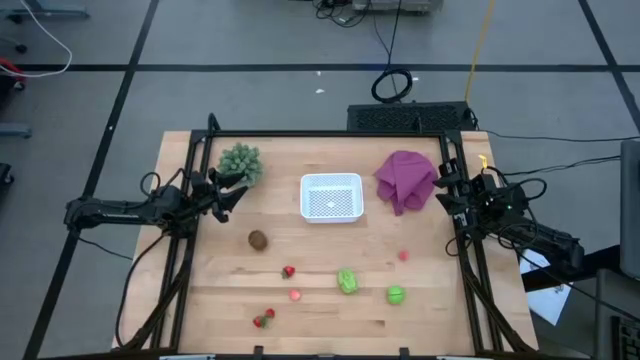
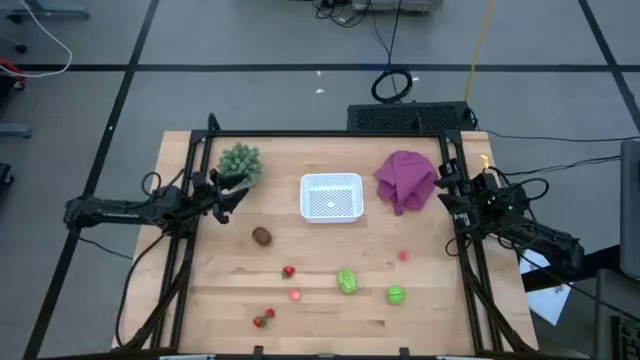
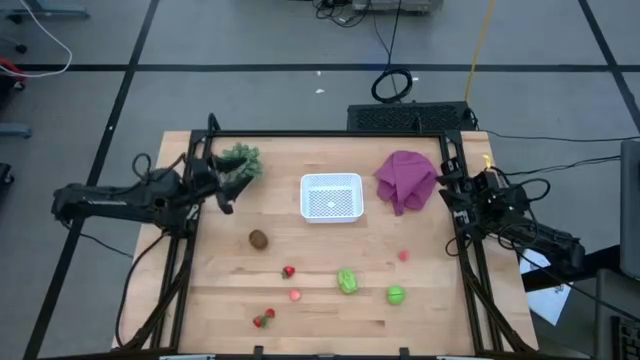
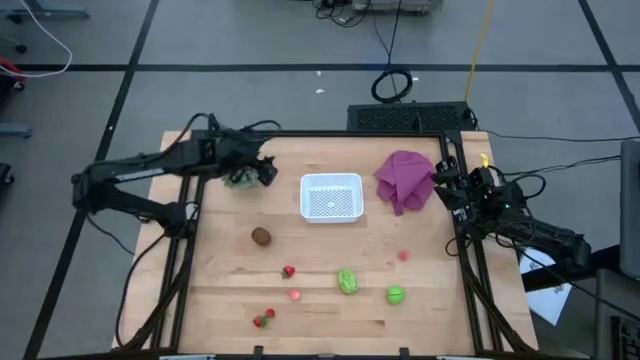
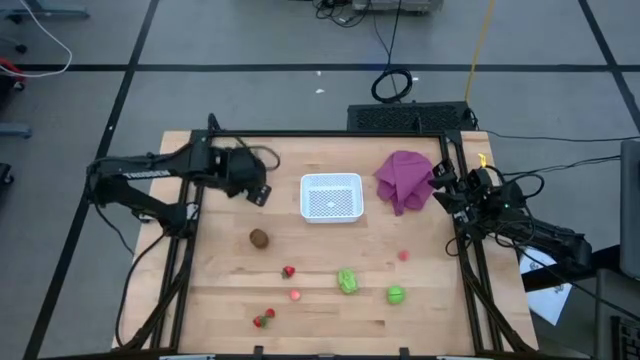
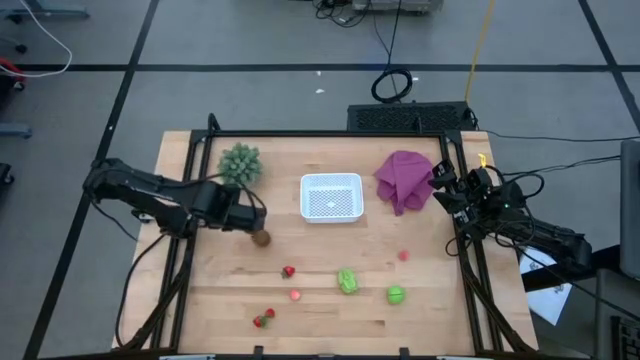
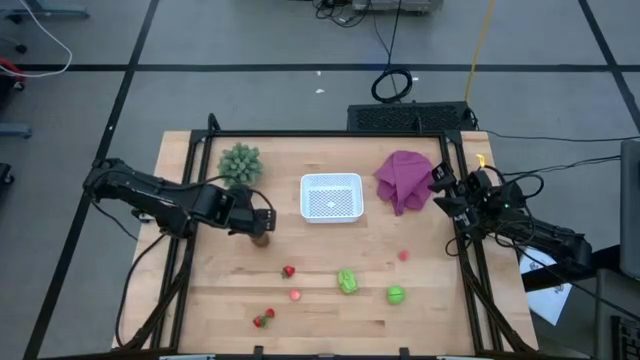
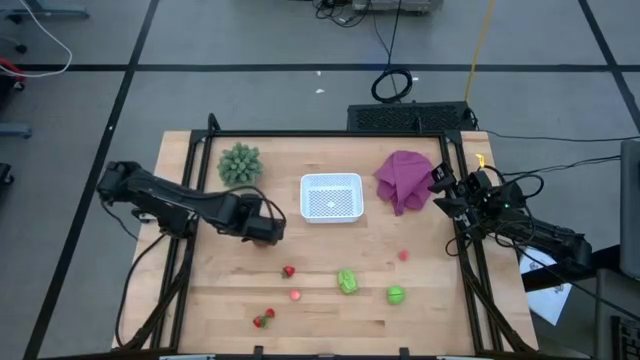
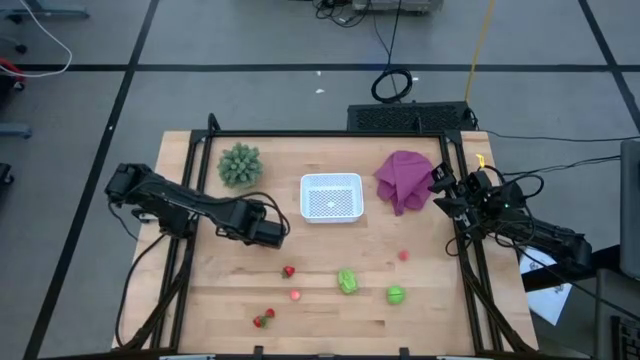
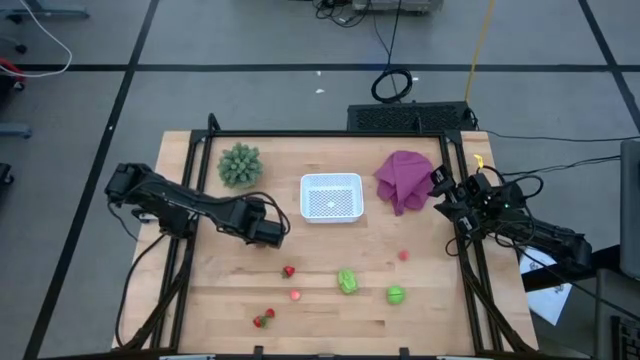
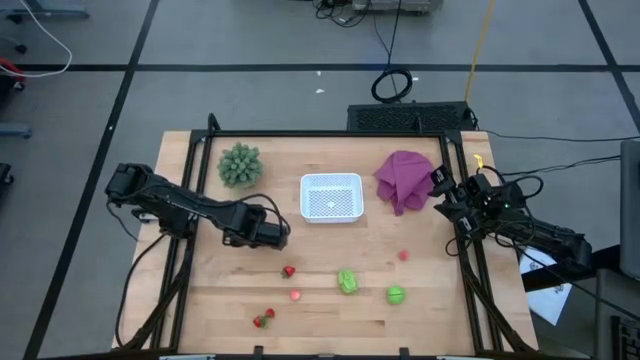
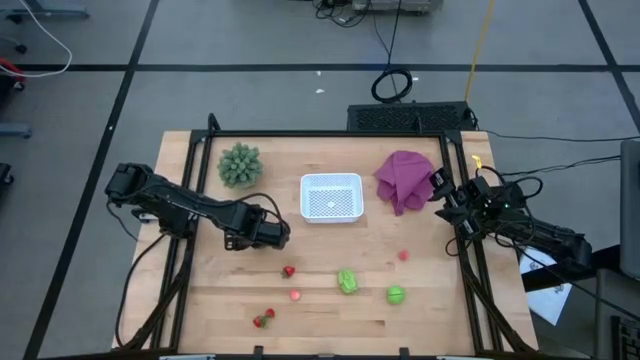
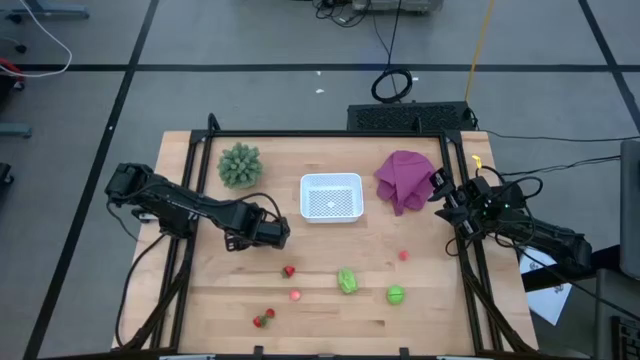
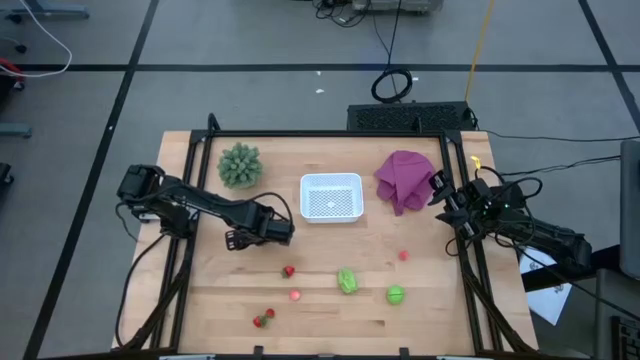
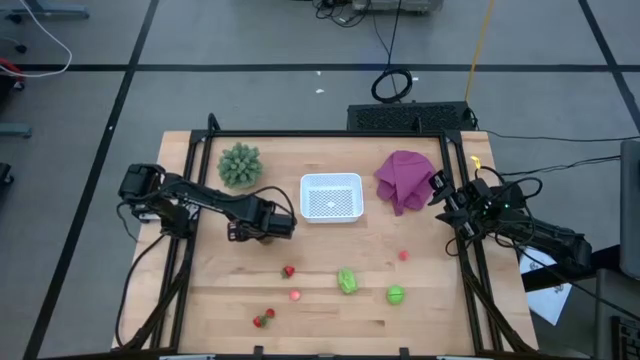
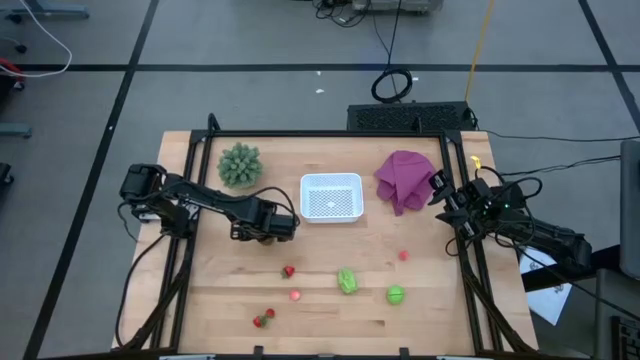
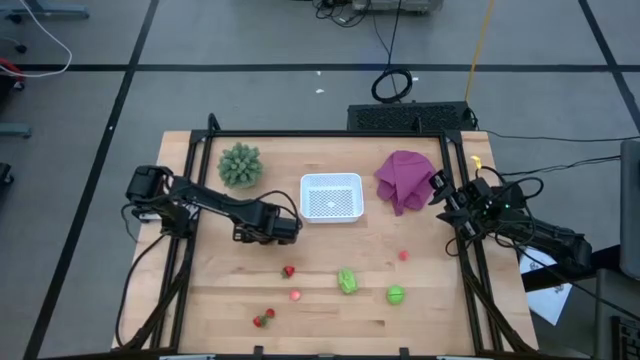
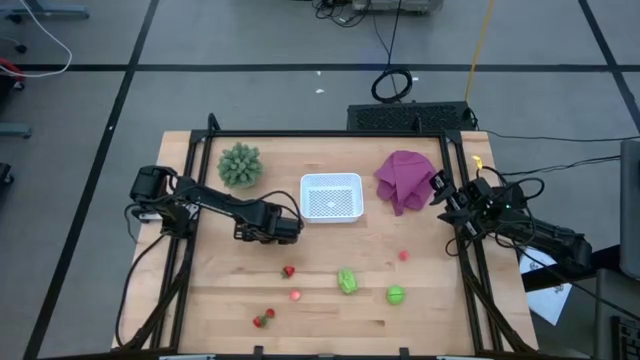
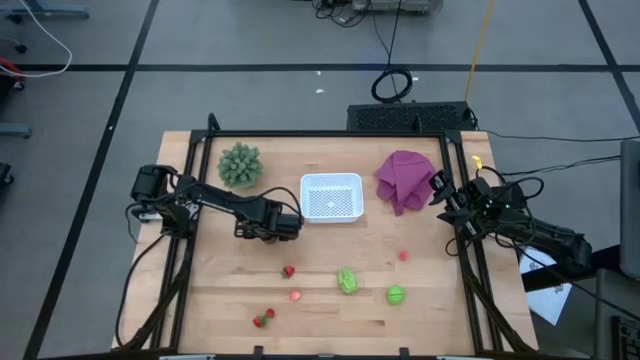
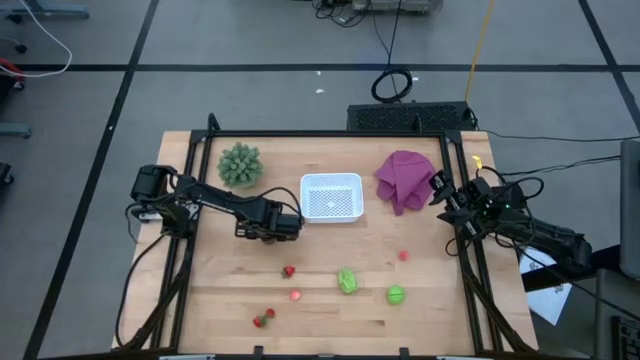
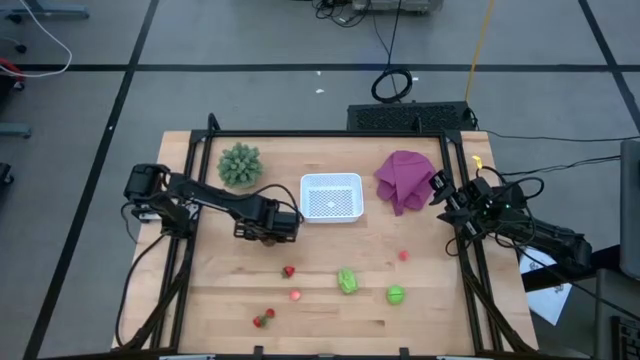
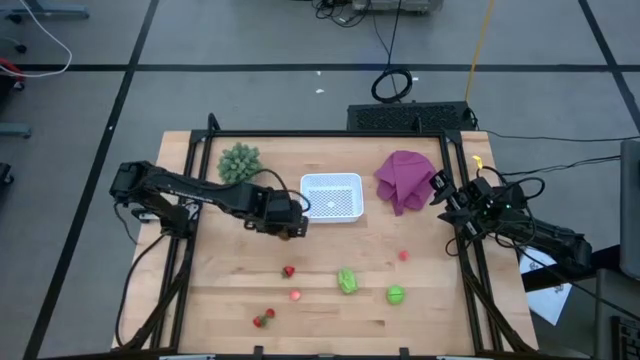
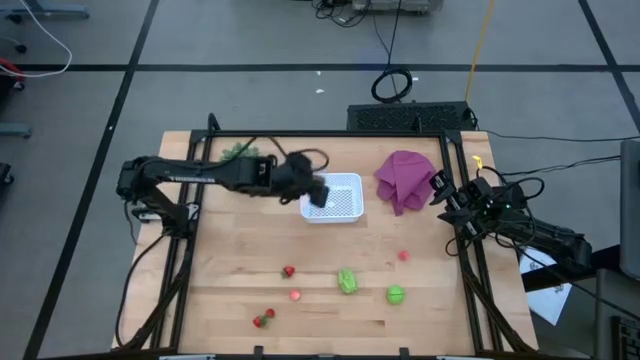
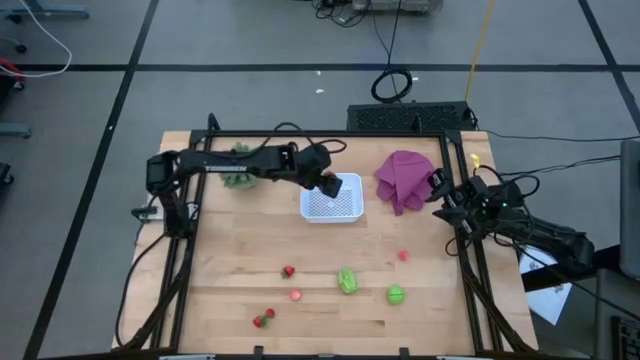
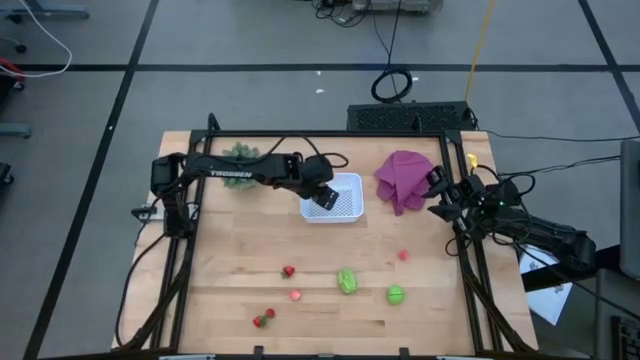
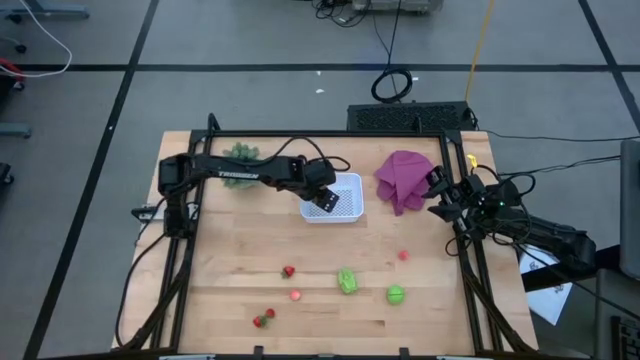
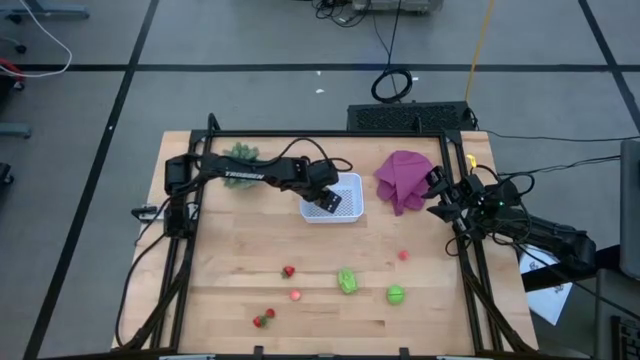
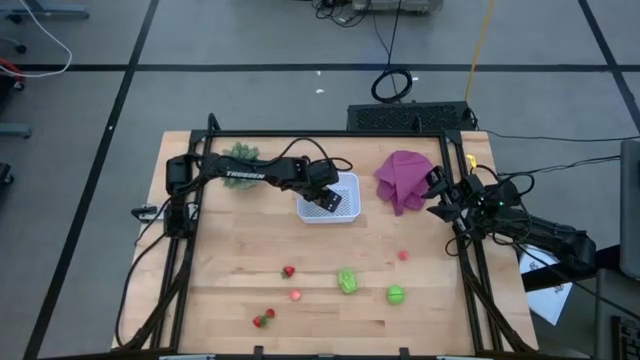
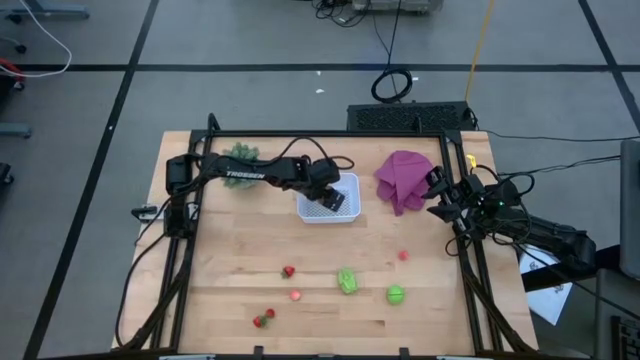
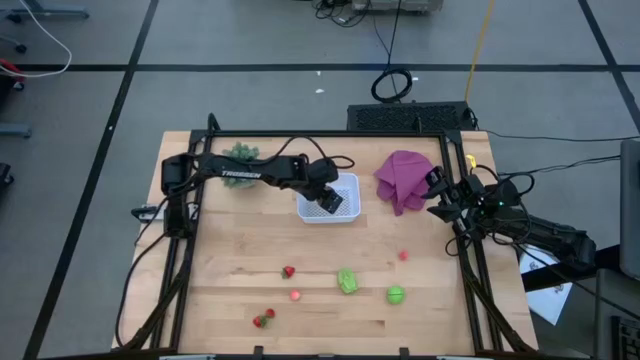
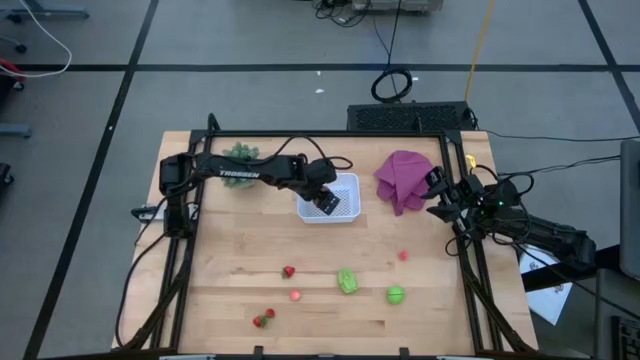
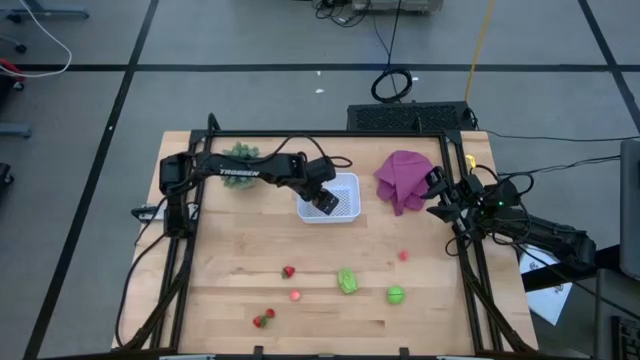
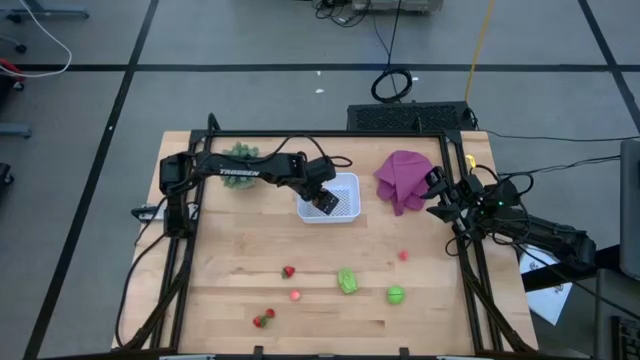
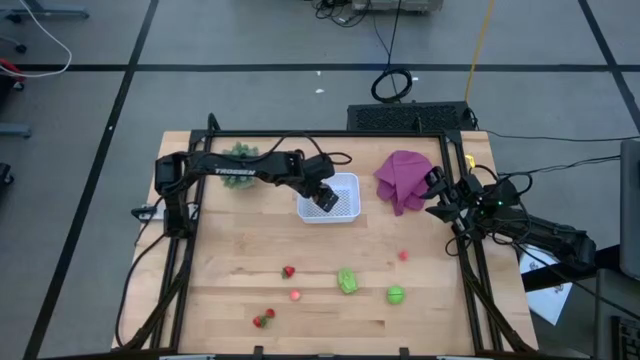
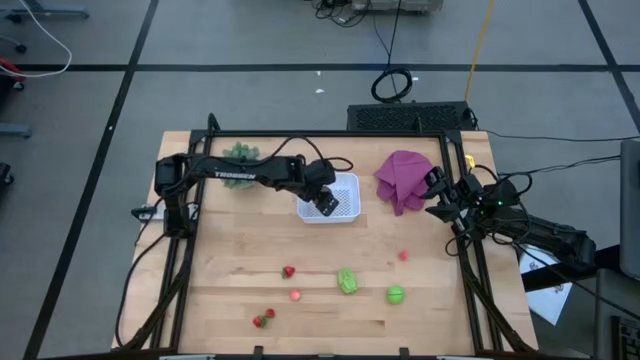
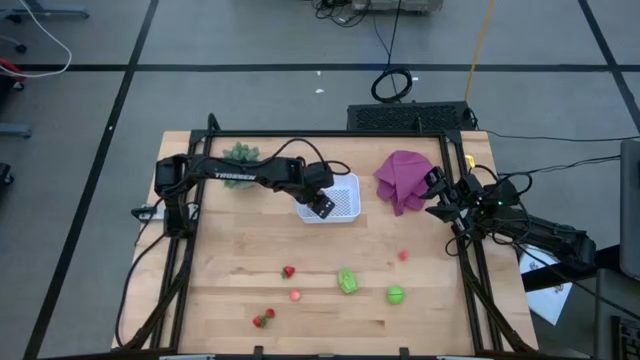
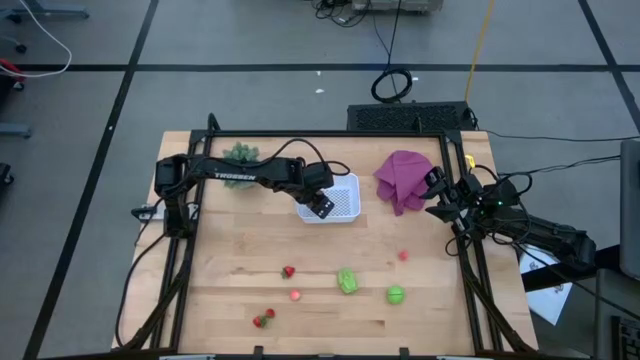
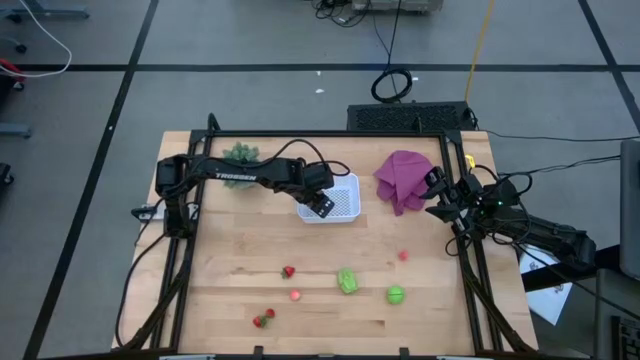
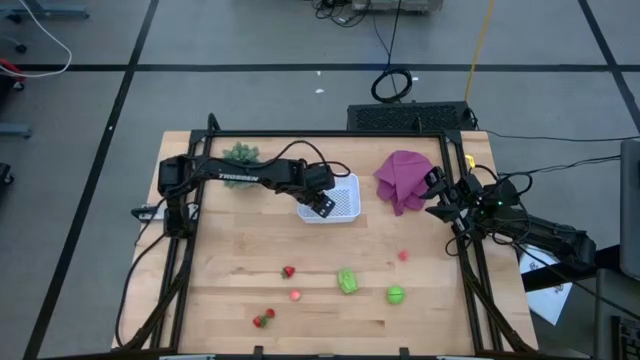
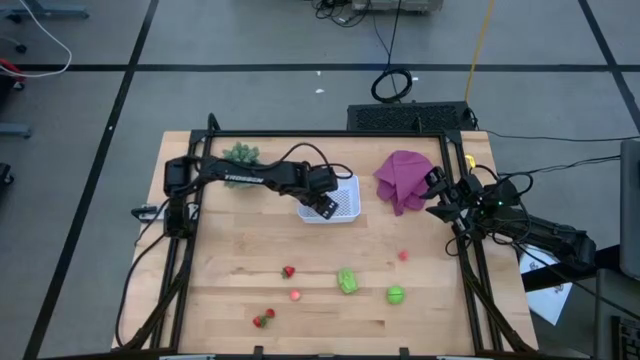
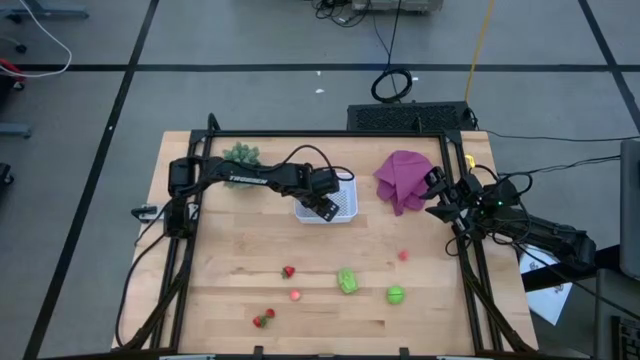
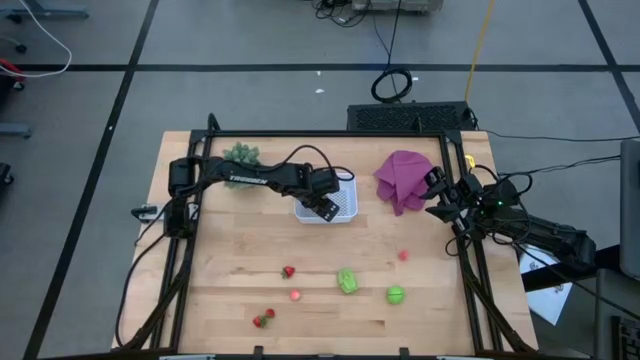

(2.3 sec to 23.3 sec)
Task: Pick and placing Produce into tupperware
Put the brown kiwi into the white bin
